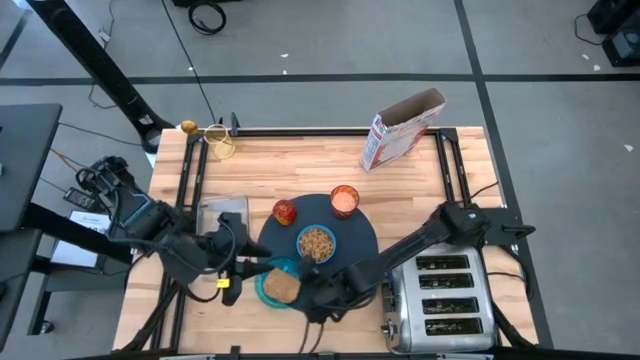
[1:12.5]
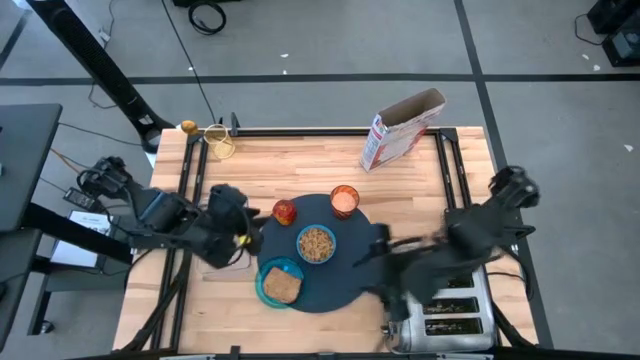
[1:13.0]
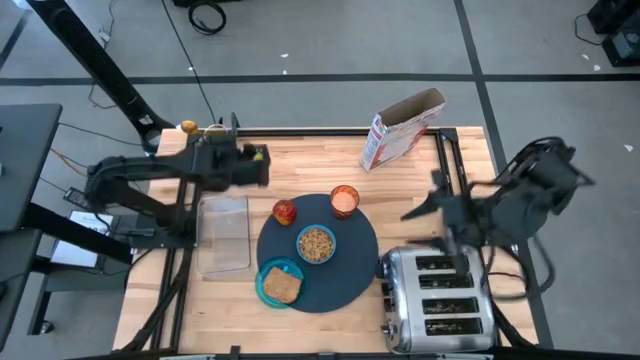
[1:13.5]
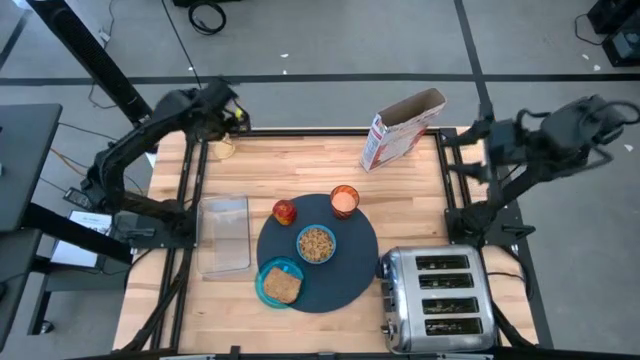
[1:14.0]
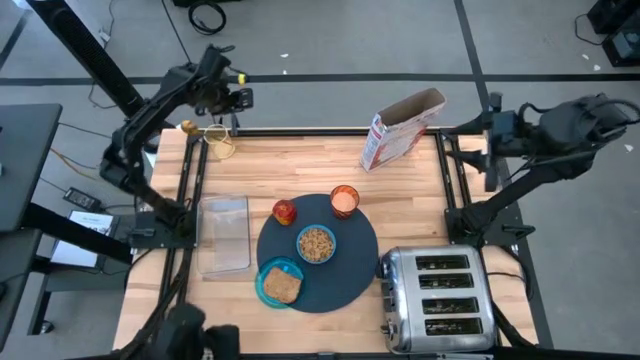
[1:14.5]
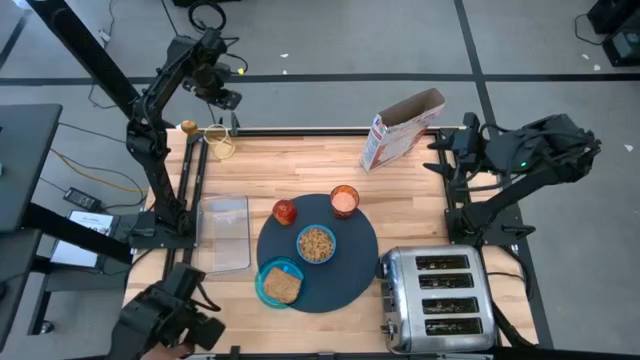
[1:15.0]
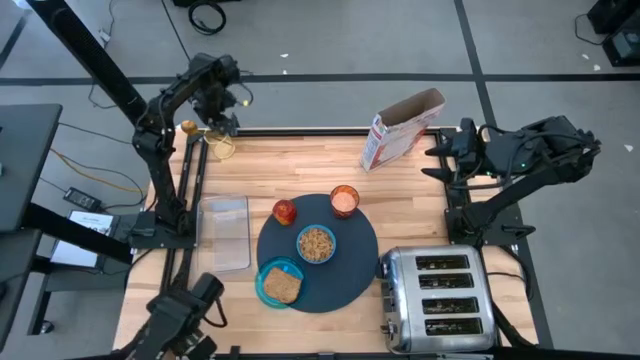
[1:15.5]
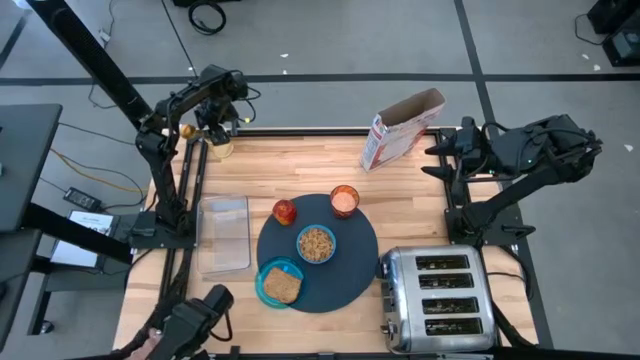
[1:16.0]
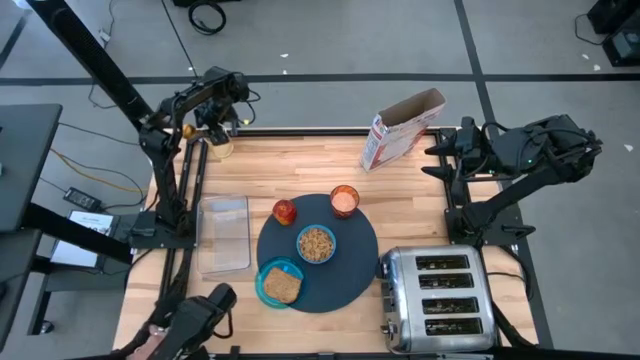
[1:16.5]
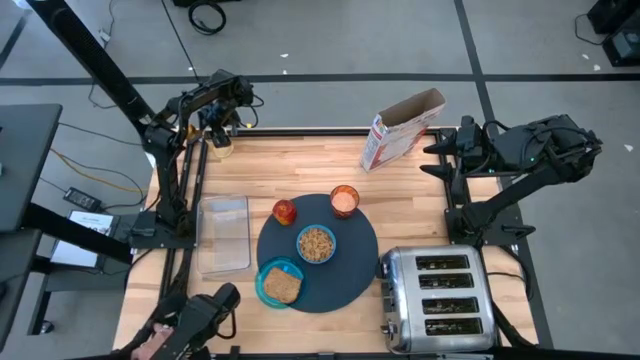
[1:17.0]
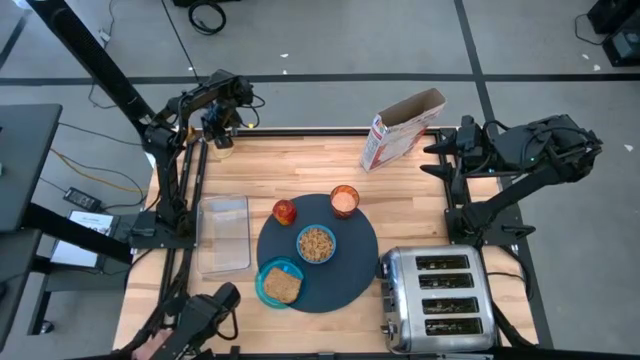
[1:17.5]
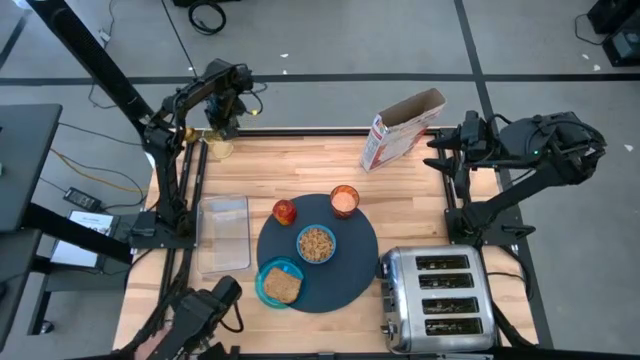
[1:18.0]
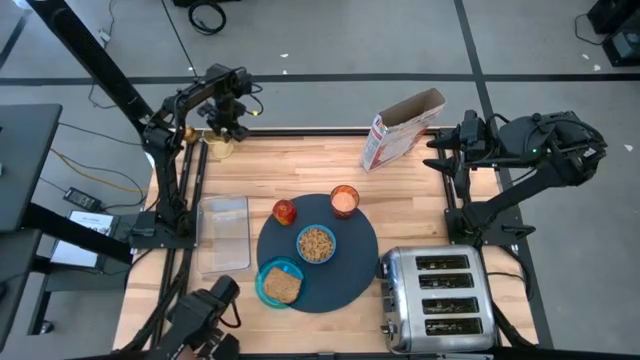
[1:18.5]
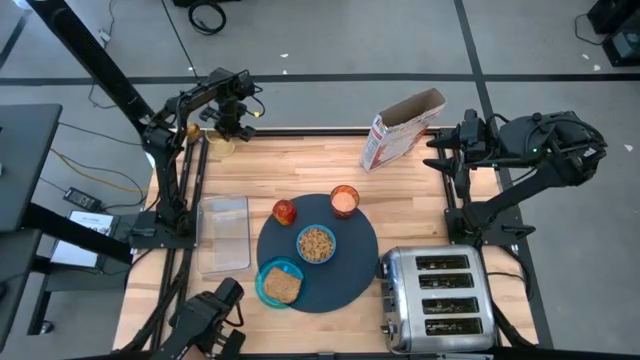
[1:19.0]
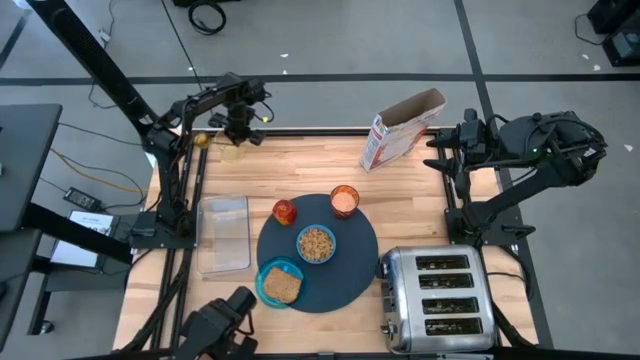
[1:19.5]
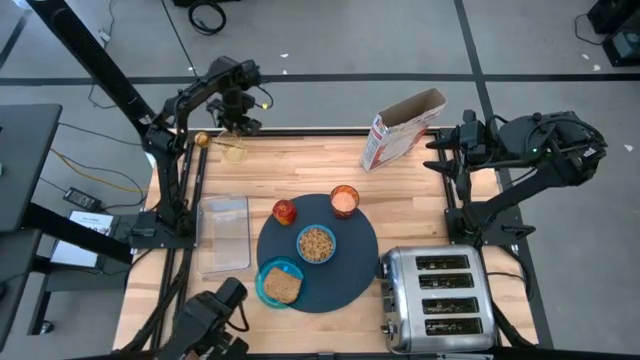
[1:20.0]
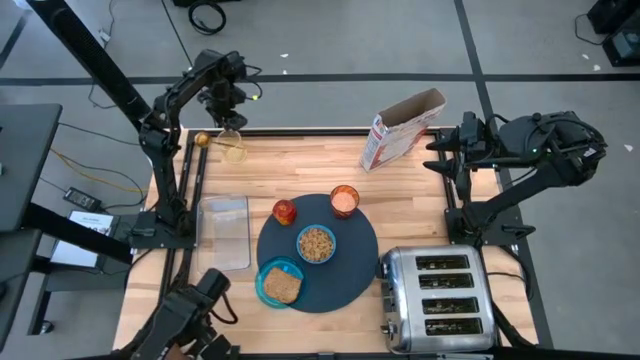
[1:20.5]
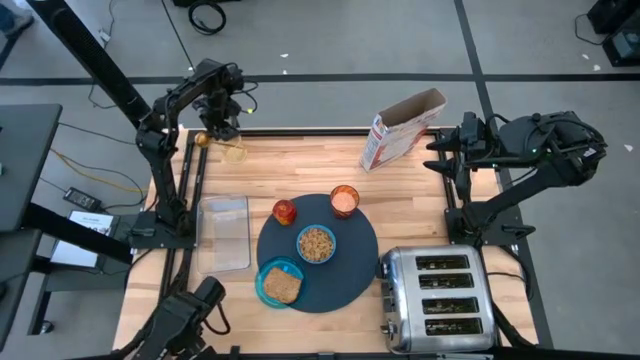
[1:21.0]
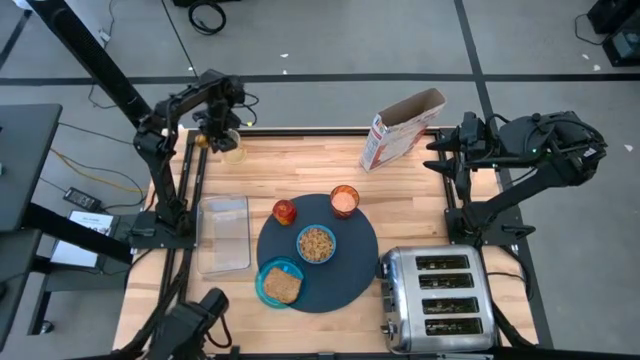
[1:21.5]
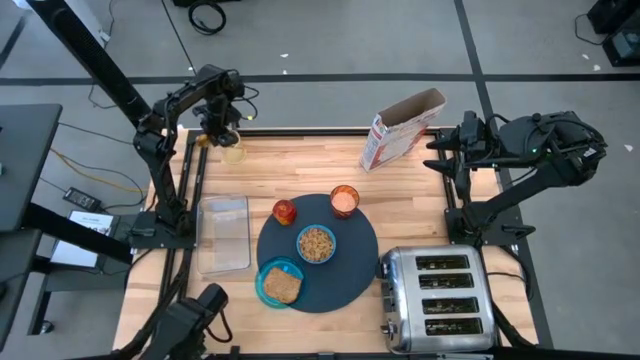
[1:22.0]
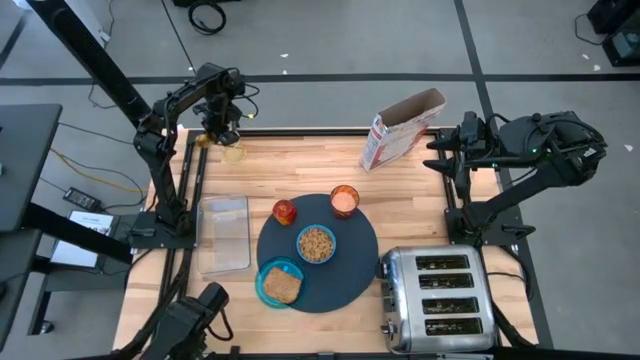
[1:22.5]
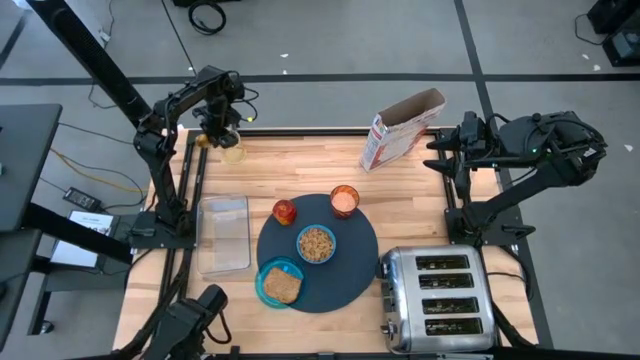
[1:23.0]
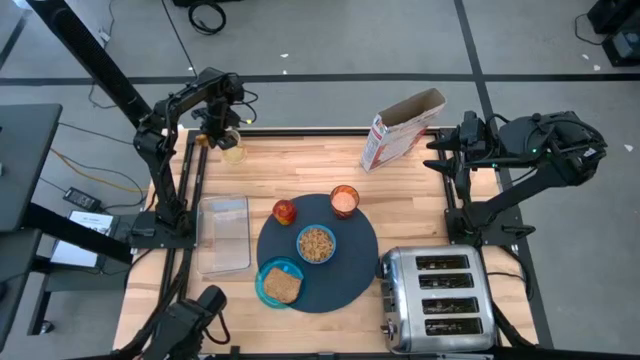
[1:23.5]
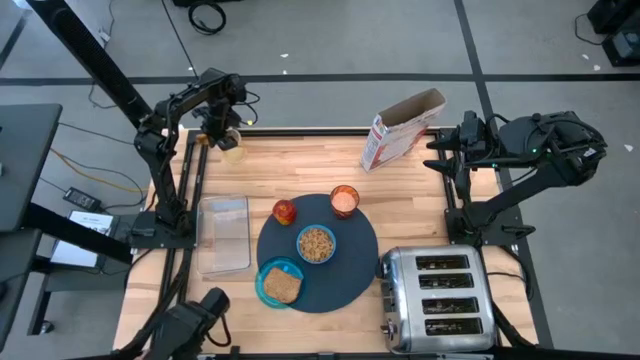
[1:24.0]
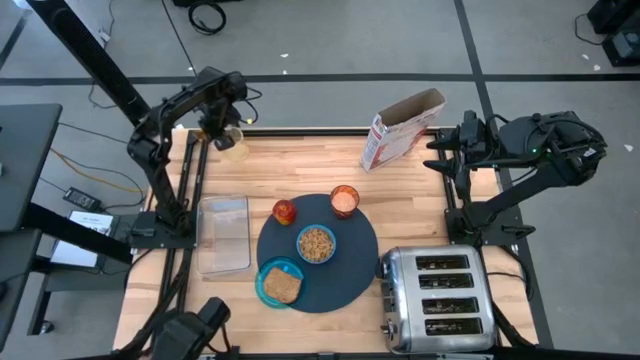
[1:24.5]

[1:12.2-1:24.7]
Task: Arrange a breakfast setting
Put the gold spoon on top of the dark blue placemat beside the blue bowl

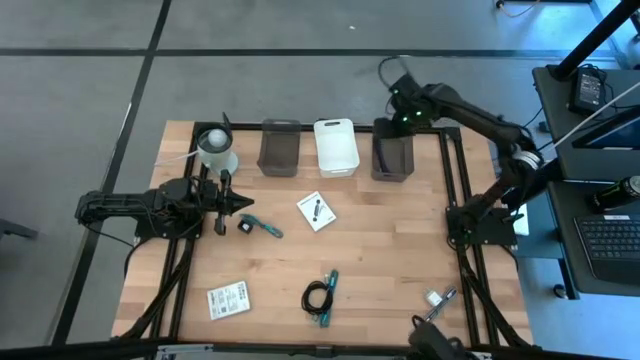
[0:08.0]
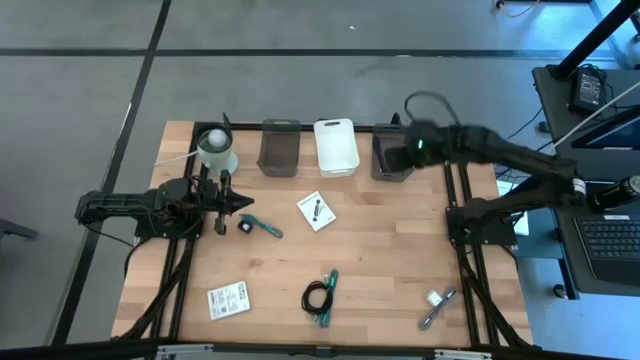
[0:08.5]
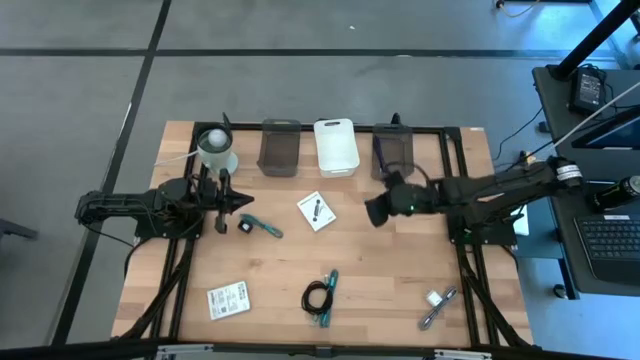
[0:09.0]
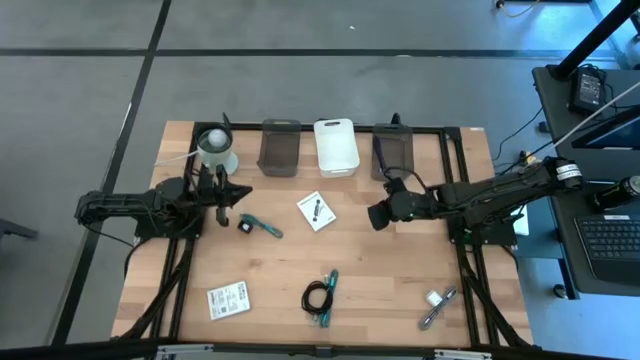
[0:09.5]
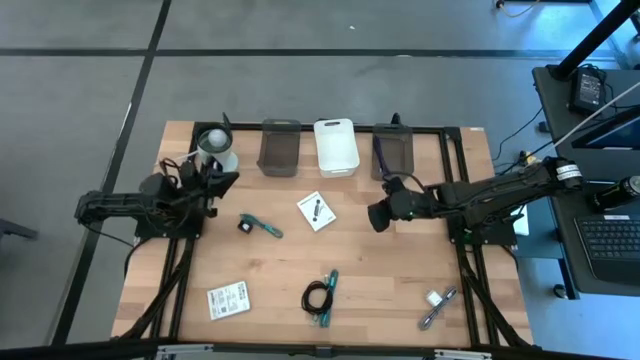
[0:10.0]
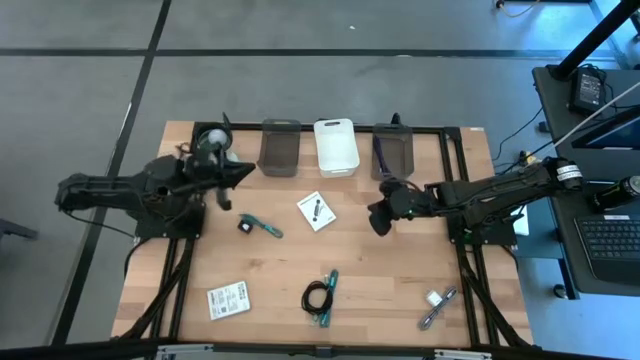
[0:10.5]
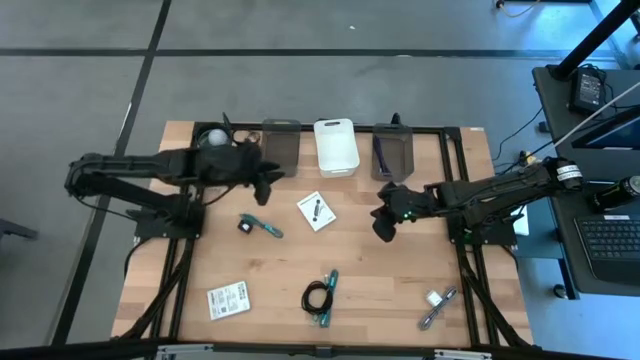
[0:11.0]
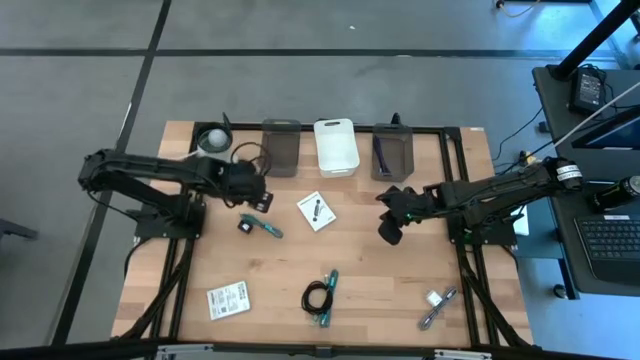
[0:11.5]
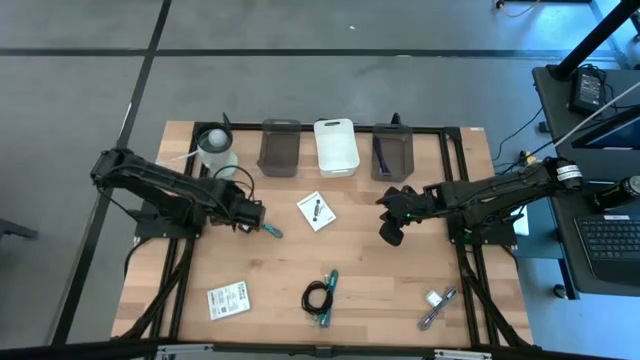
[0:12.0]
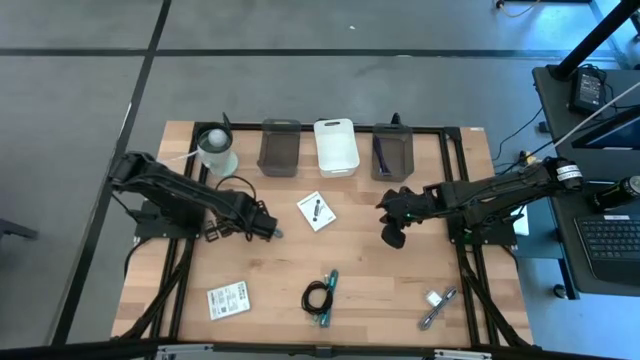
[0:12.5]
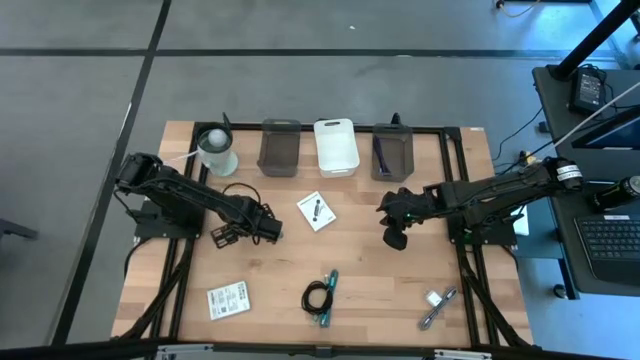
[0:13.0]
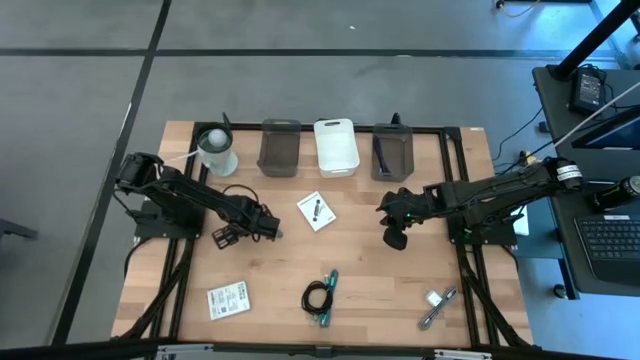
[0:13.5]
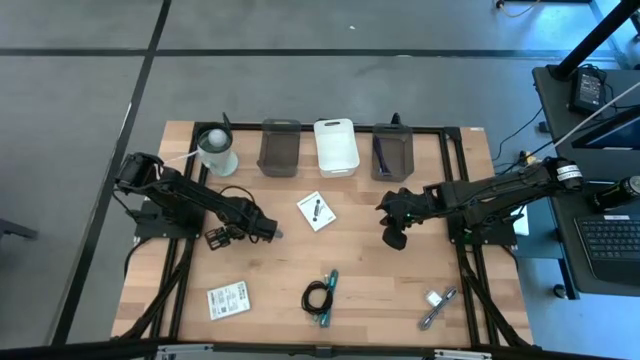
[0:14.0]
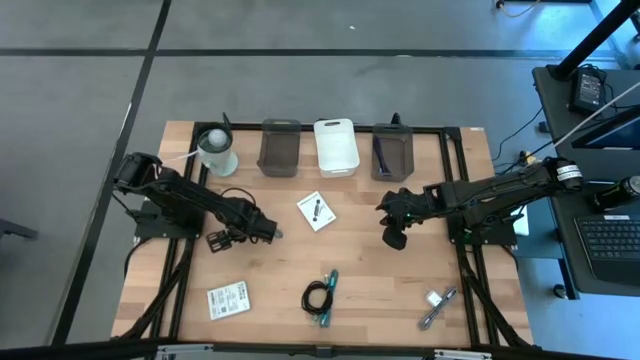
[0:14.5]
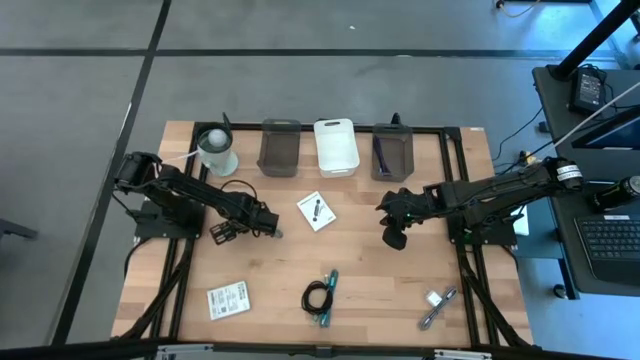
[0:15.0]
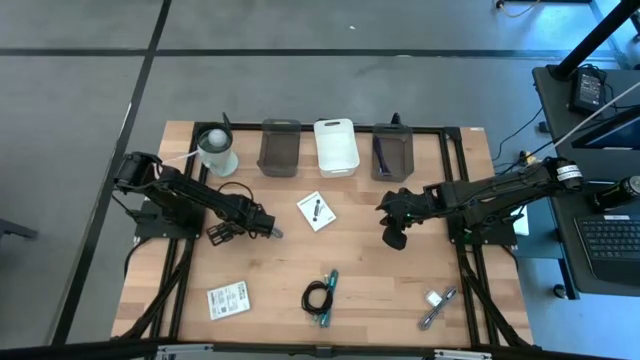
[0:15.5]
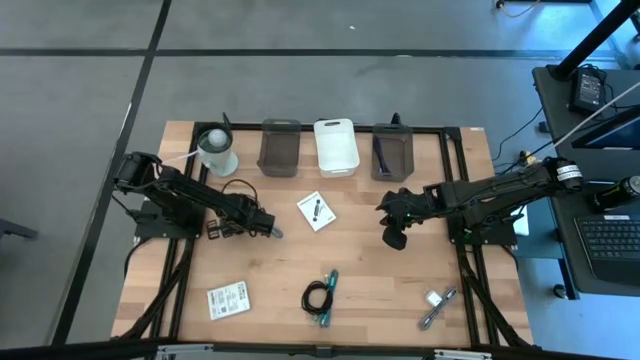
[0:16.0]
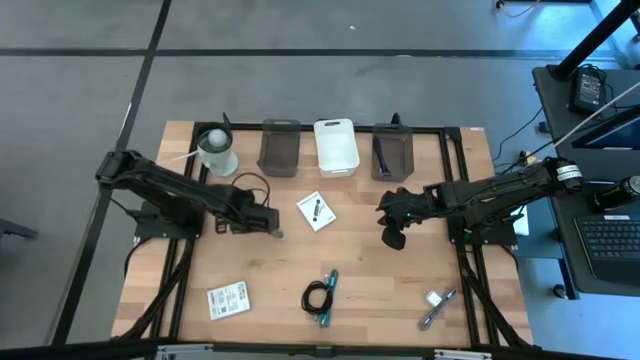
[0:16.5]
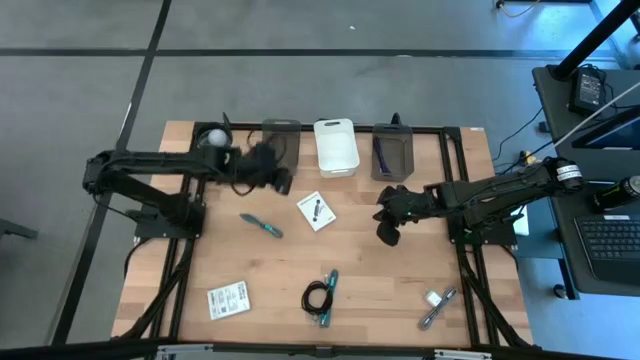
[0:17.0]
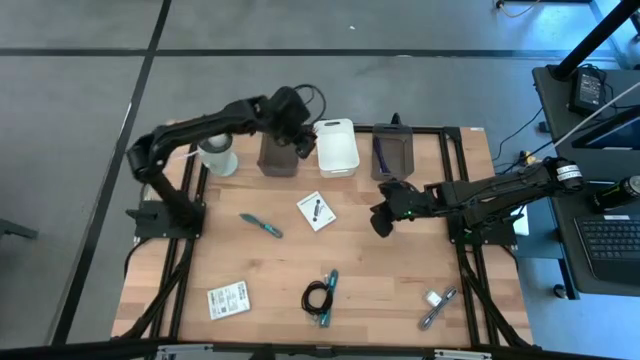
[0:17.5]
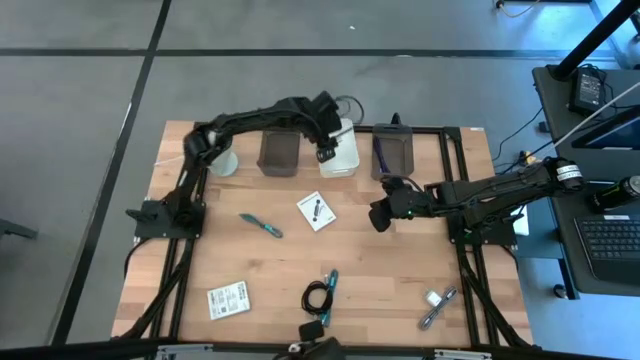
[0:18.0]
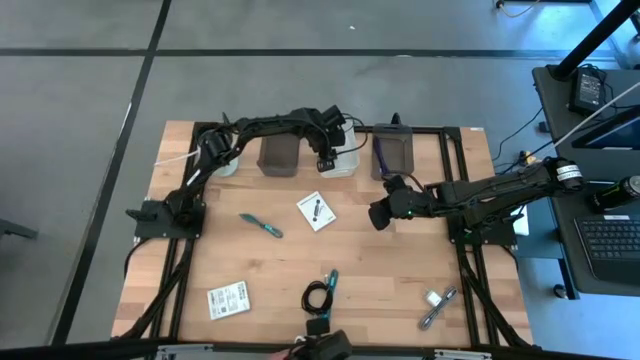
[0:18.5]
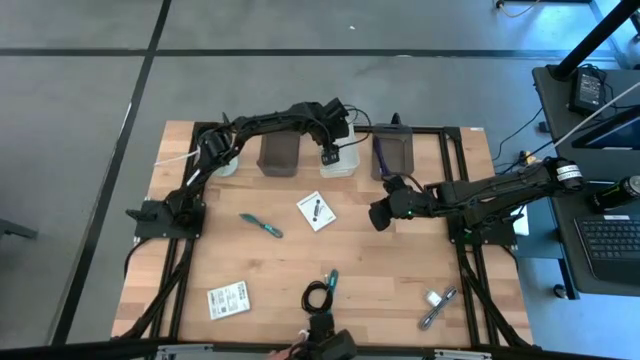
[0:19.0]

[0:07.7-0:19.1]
Task: Pick and place items into bin
Put the black charger adapter into the white bin
